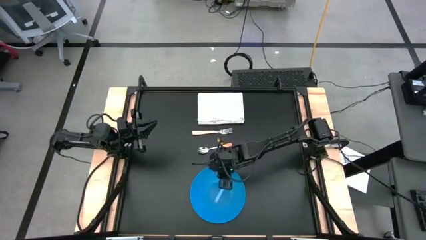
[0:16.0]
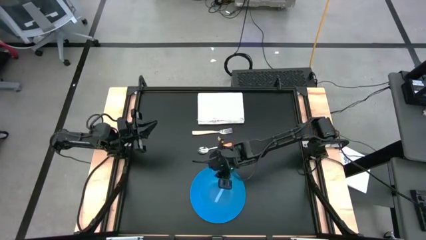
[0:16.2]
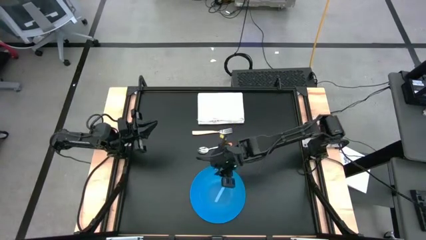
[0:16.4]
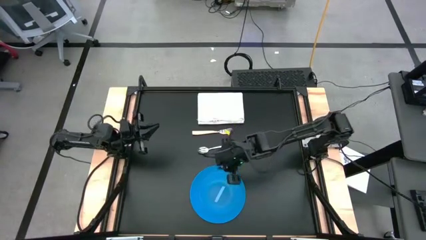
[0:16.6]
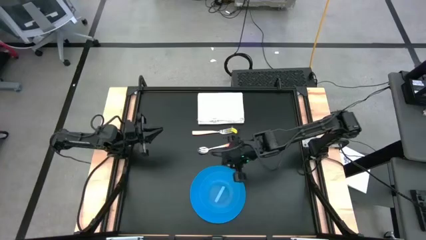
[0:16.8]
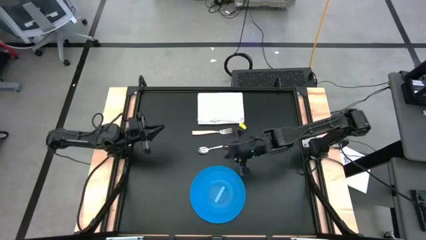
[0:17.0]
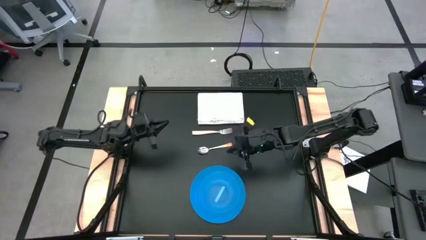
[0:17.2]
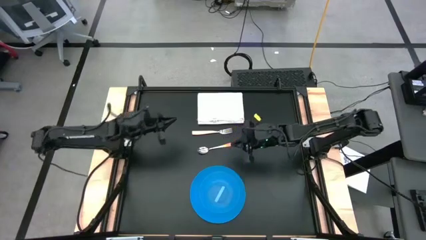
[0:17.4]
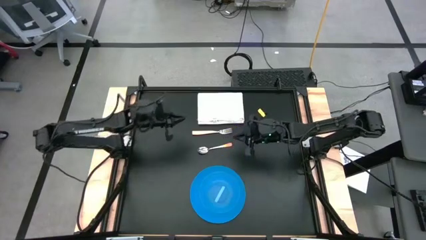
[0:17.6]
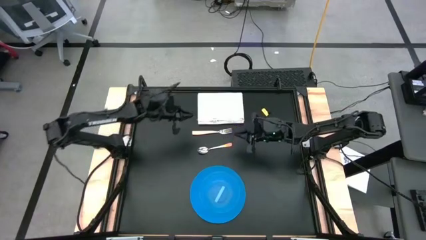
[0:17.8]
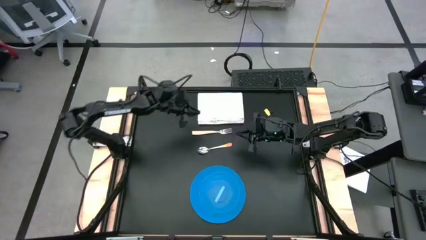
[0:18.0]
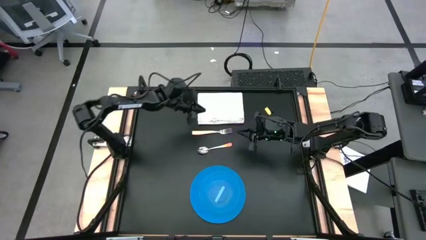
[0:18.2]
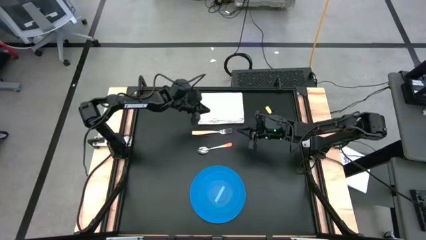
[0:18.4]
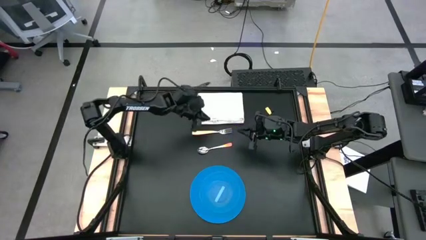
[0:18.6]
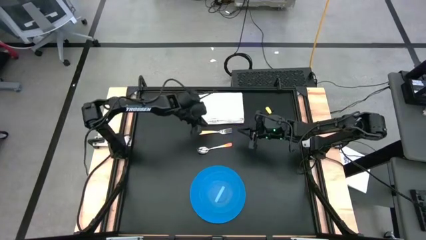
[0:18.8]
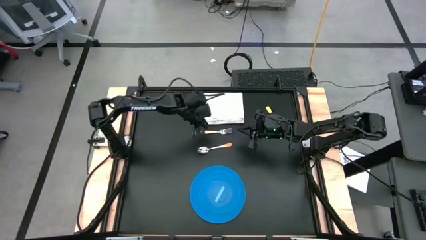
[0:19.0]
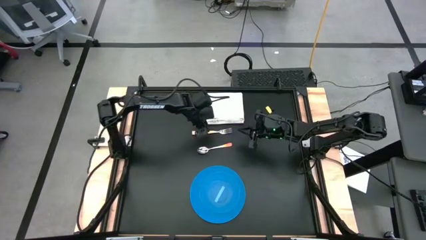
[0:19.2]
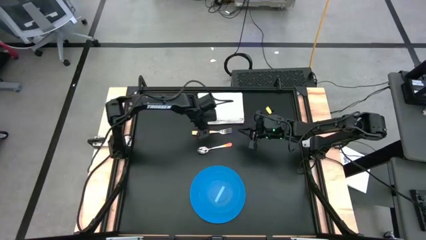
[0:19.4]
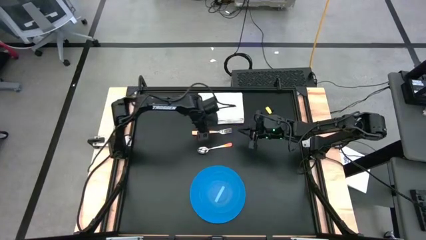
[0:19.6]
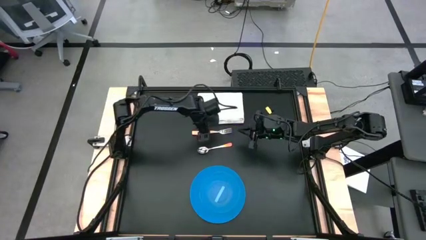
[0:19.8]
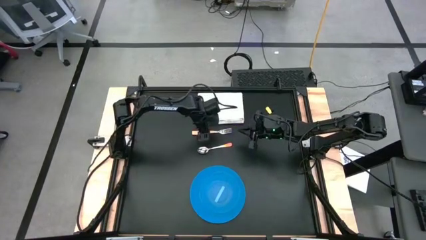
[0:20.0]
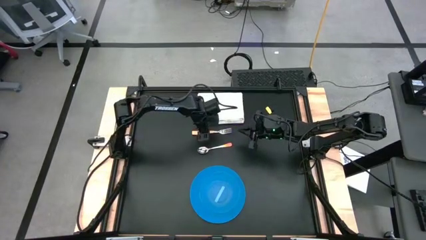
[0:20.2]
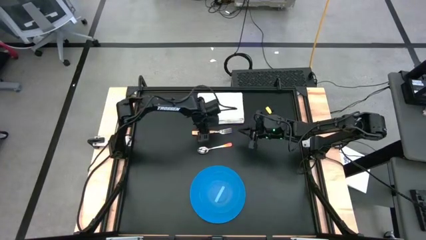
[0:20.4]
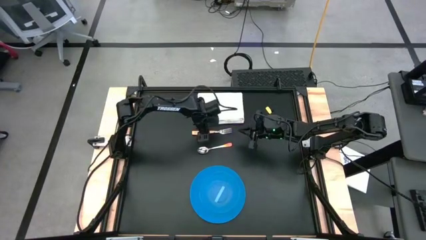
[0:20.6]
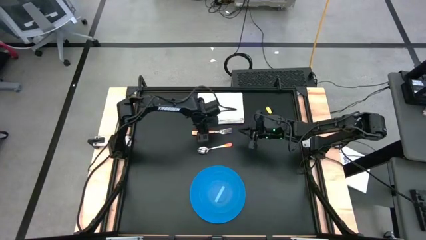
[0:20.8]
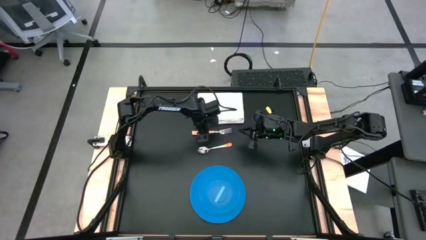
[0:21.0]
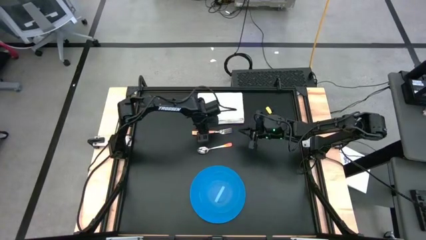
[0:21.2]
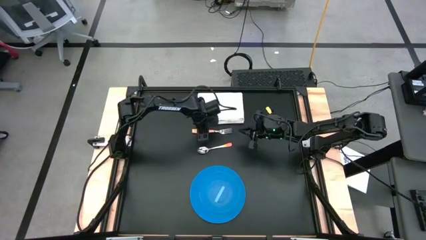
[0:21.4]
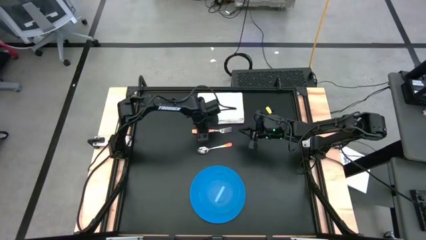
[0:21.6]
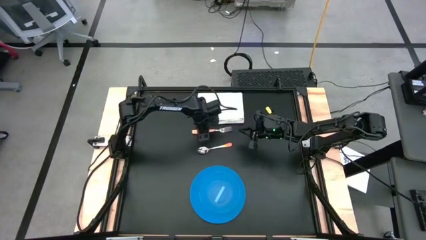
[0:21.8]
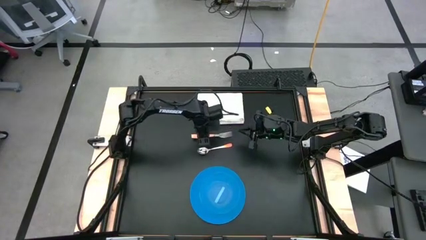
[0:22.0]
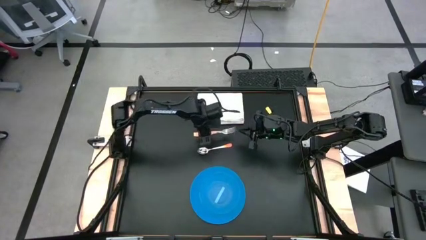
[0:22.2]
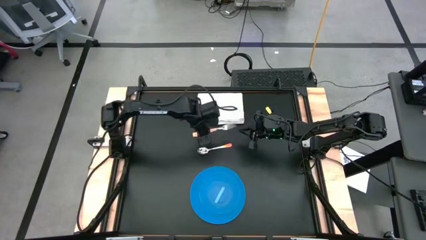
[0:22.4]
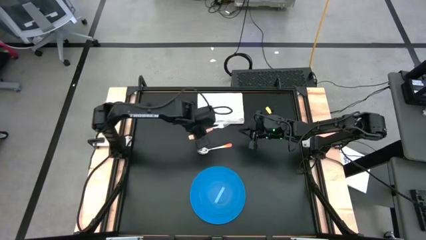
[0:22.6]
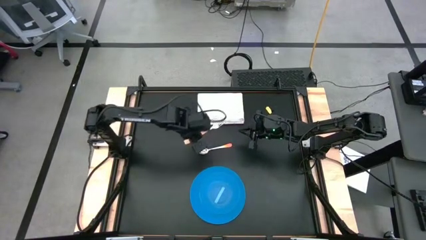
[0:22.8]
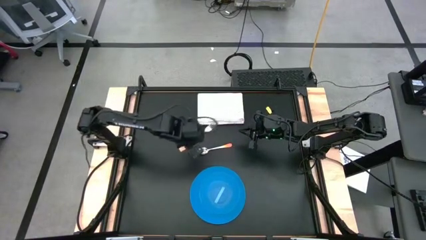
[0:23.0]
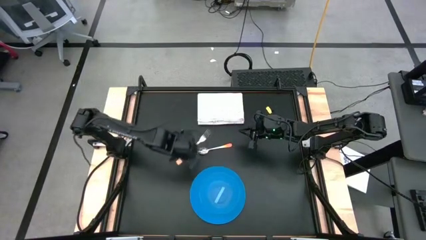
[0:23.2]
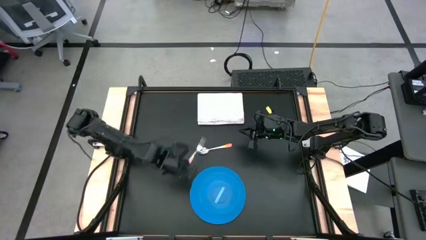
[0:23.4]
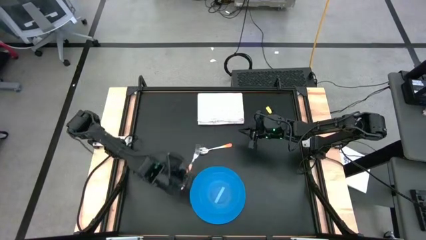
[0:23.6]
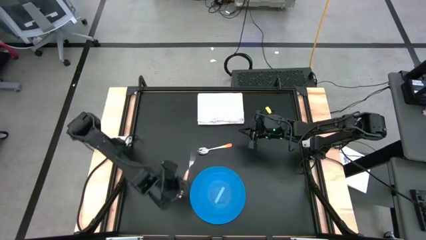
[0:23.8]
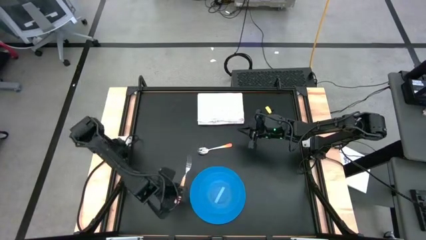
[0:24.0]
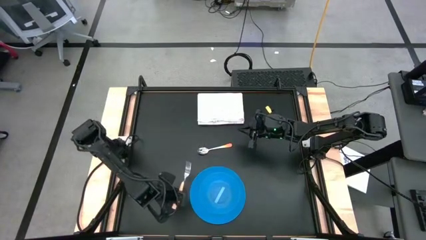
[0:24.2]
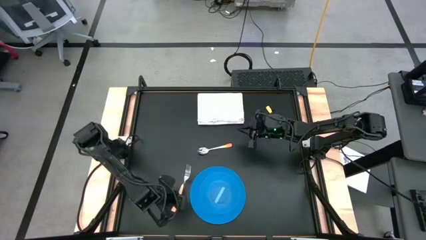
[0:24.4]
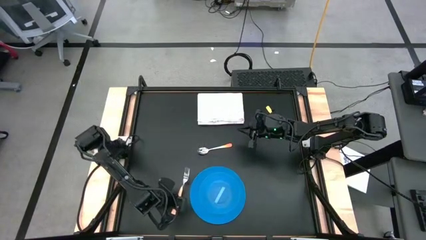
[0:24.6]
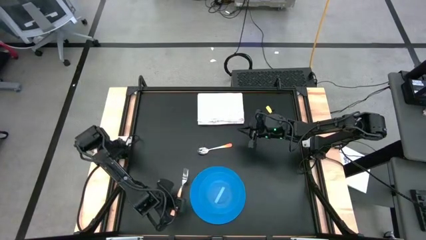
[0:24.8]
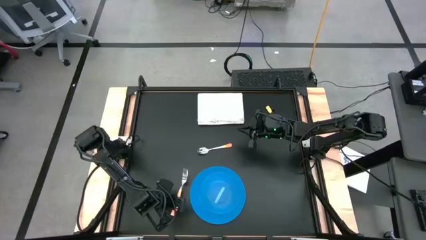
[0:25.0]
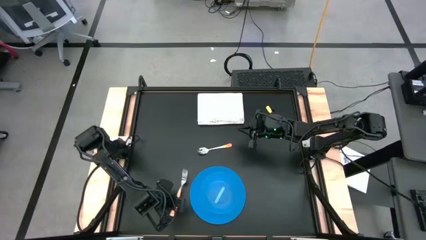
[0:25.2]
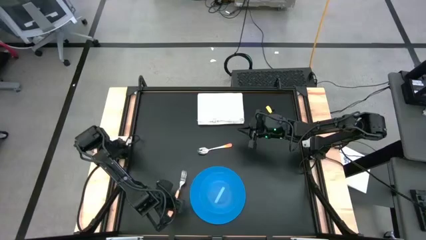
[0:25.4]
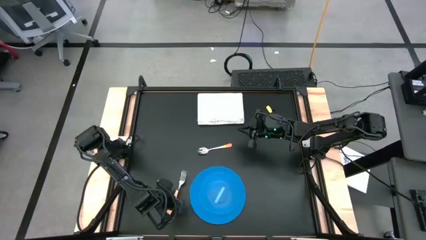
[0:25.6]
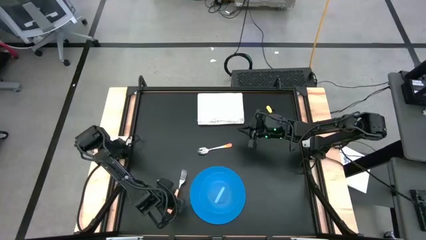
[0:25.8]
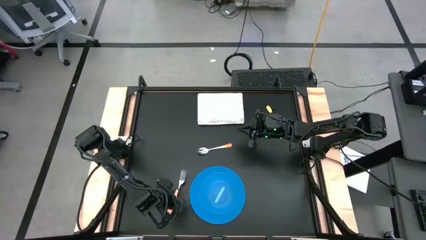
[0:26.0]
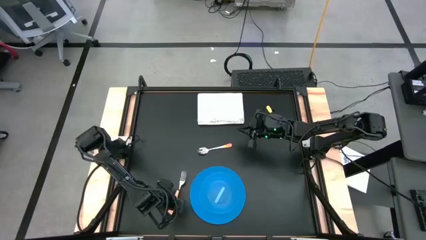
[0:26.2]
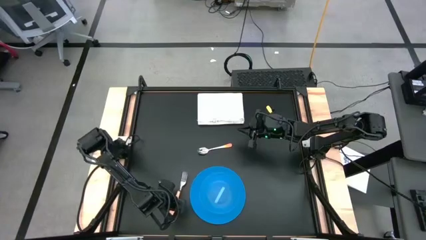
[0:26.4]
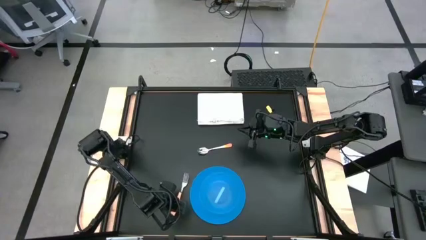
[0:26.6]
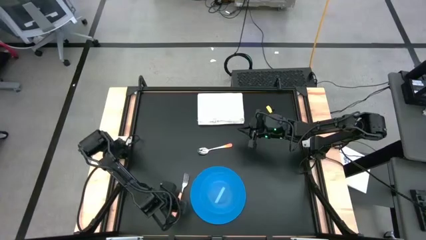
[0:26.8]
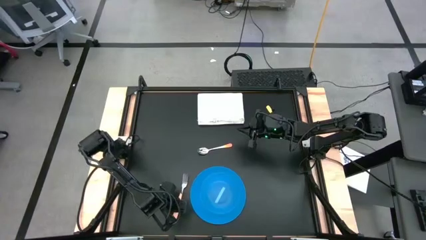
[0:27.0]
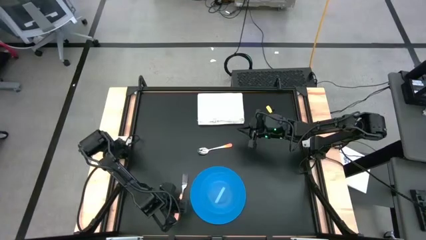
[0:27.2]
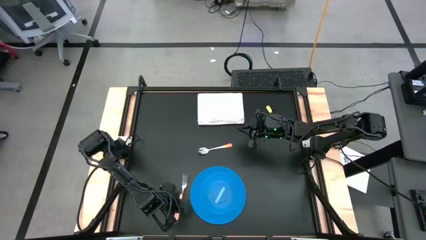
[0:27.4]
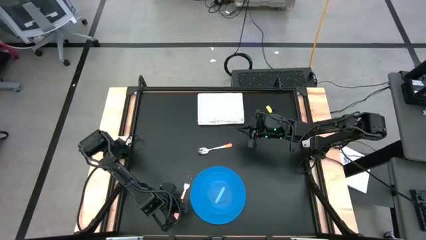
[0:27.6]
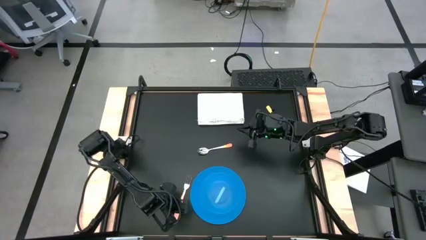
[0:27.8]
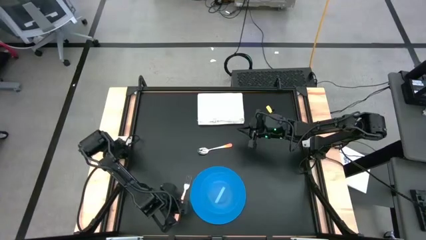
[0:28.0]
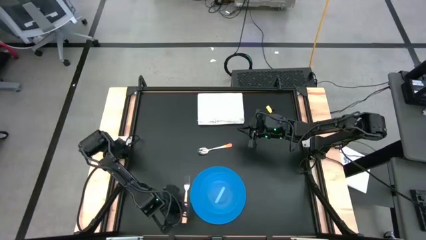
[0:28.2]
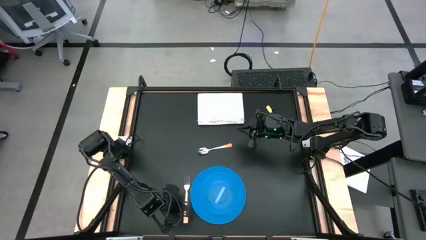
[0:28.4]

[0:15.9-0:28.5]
Task: Set table place
Move the orange fork below the napkin to the left side of the blue plate
